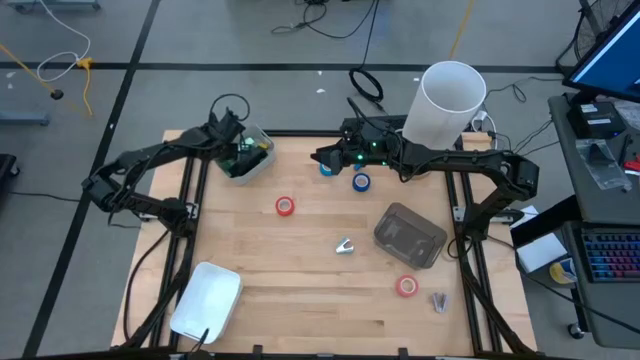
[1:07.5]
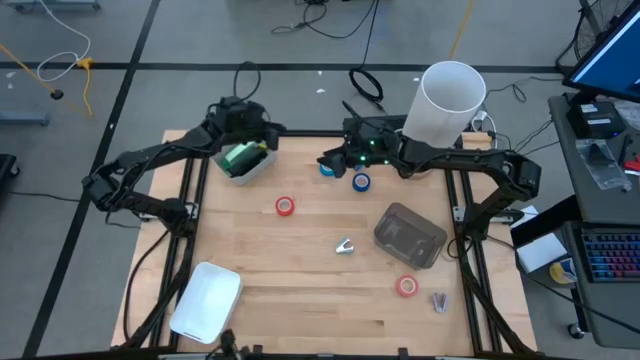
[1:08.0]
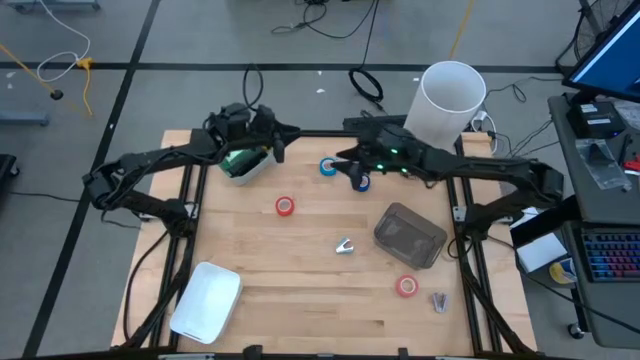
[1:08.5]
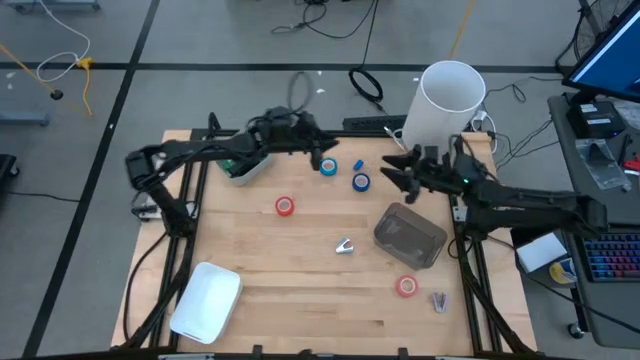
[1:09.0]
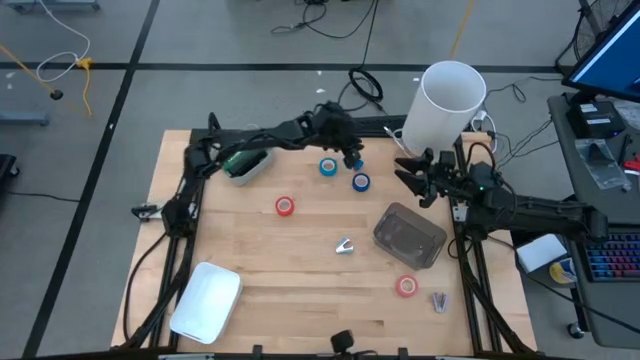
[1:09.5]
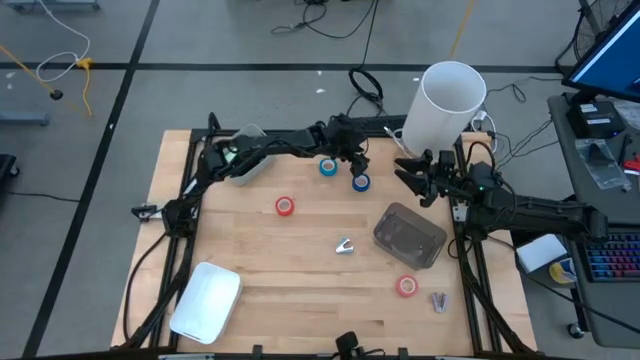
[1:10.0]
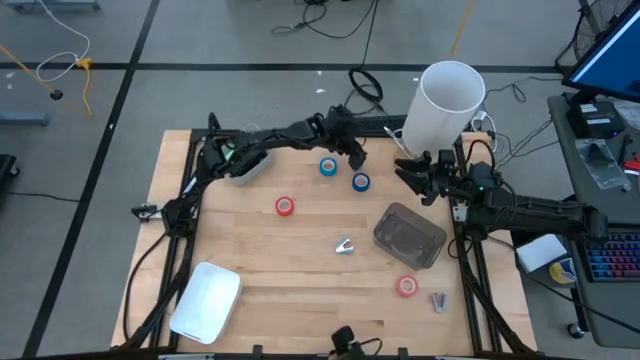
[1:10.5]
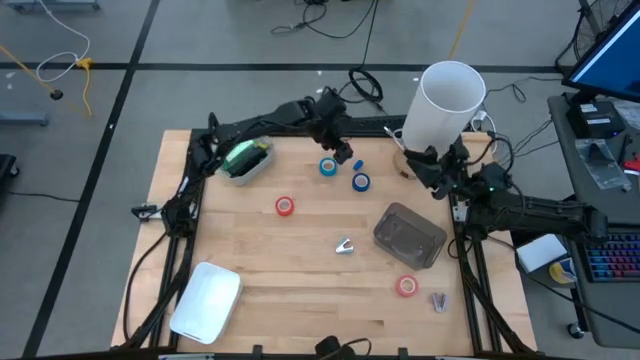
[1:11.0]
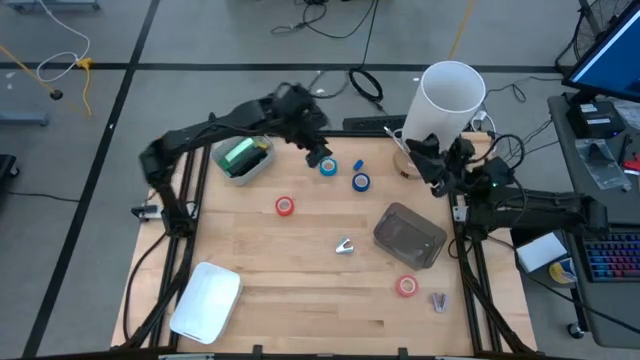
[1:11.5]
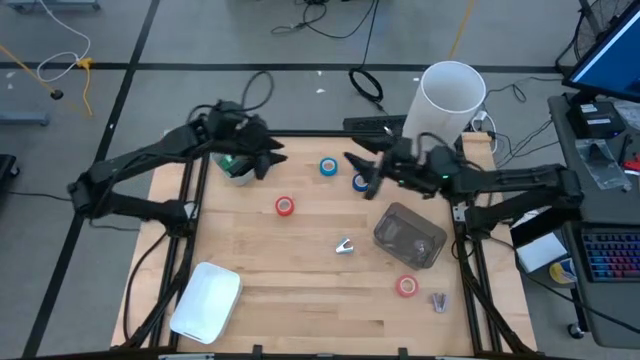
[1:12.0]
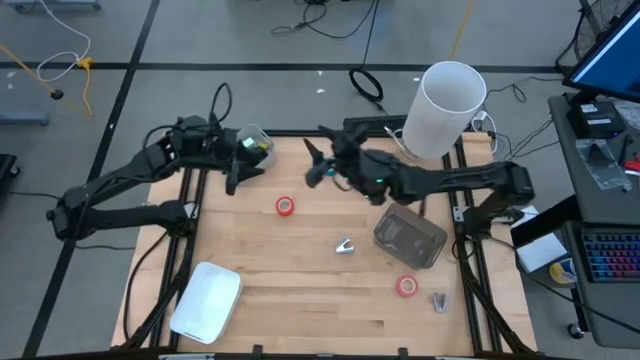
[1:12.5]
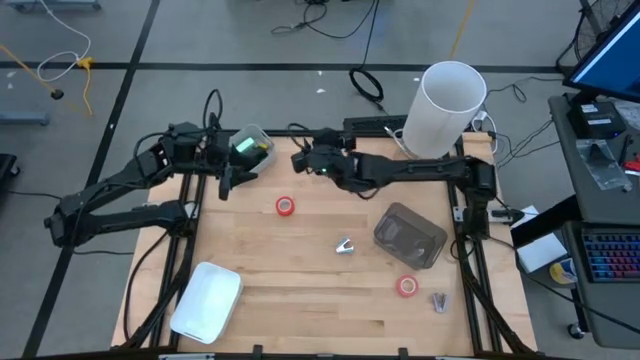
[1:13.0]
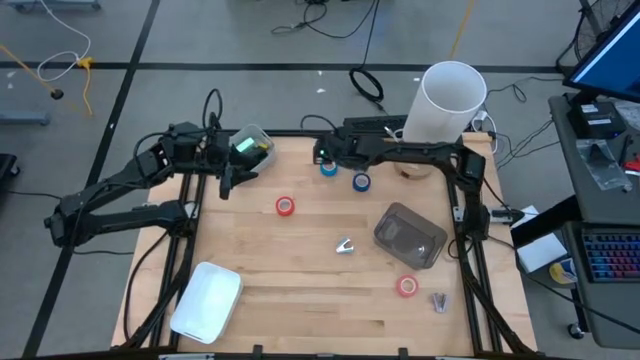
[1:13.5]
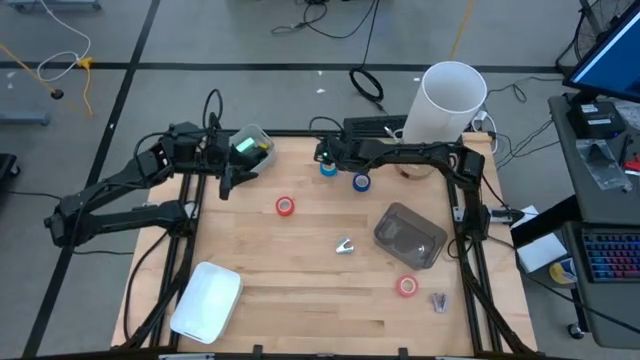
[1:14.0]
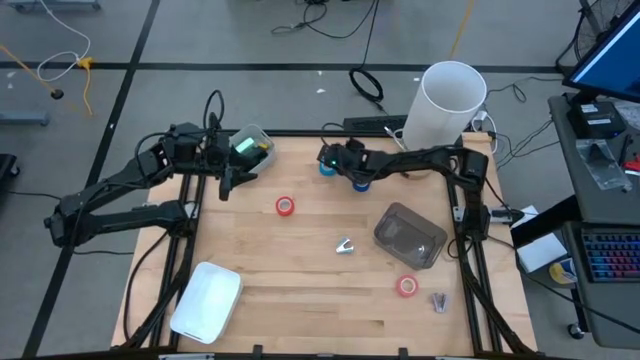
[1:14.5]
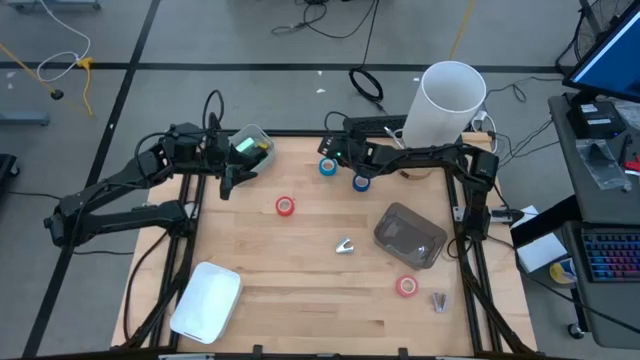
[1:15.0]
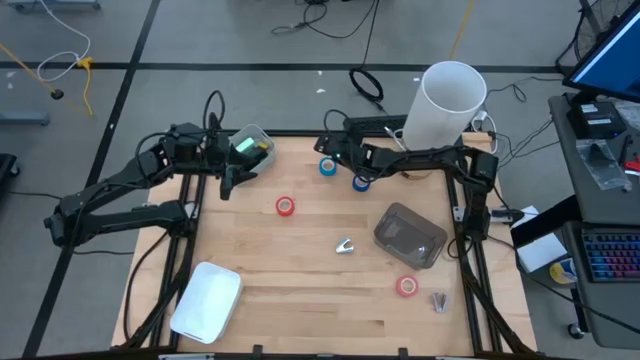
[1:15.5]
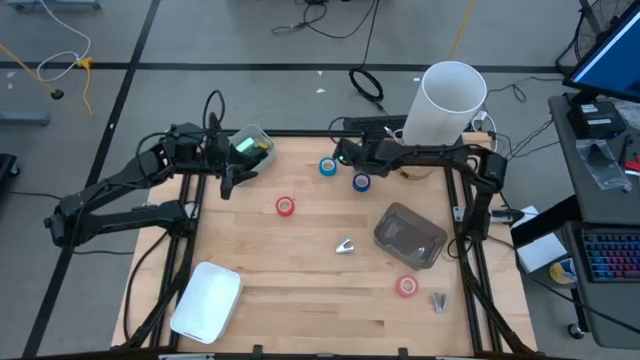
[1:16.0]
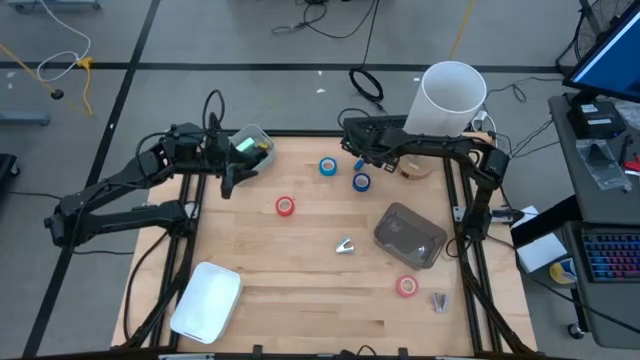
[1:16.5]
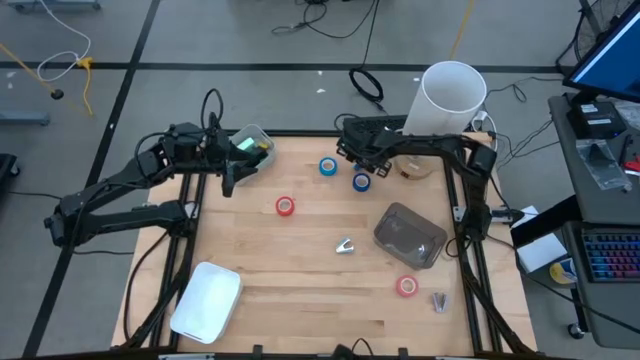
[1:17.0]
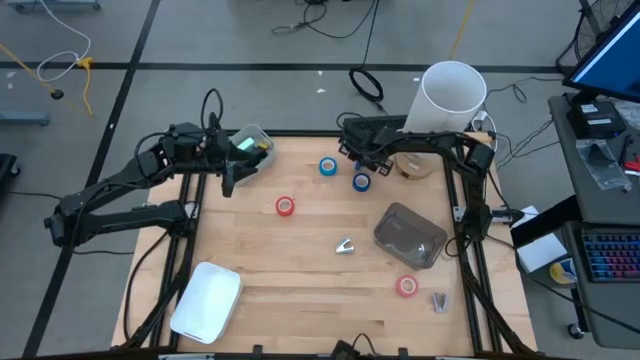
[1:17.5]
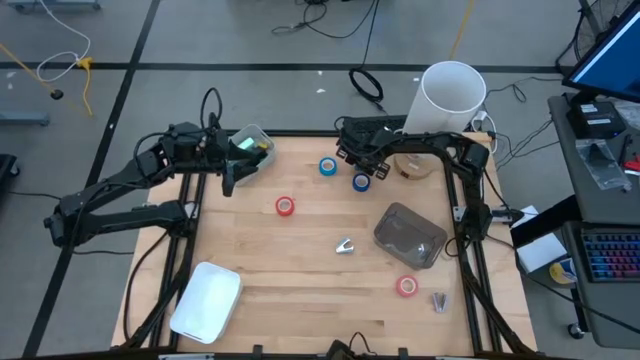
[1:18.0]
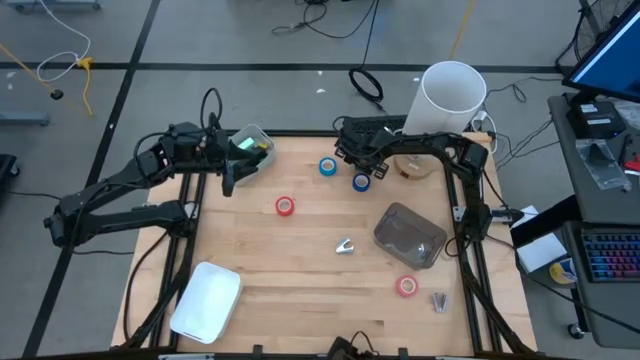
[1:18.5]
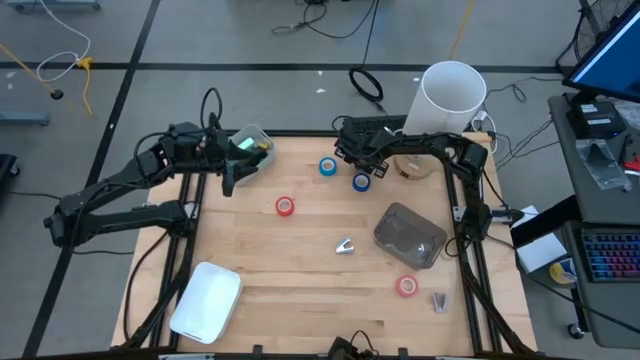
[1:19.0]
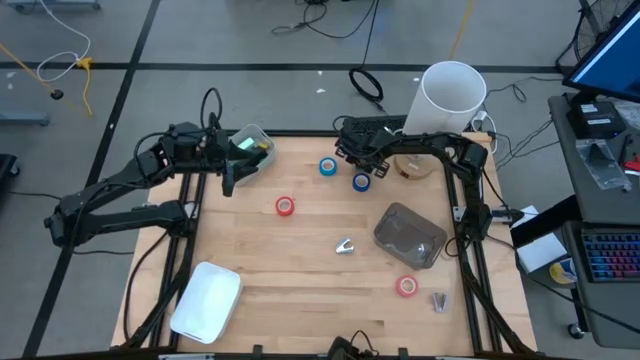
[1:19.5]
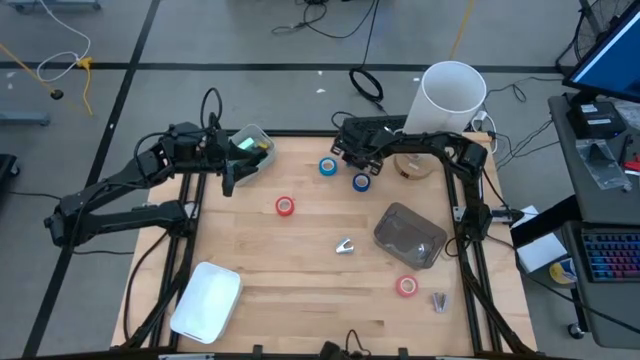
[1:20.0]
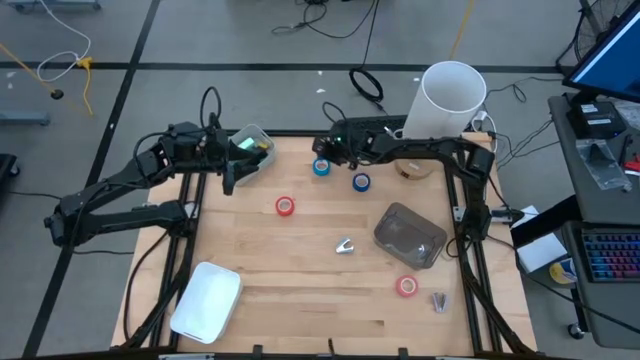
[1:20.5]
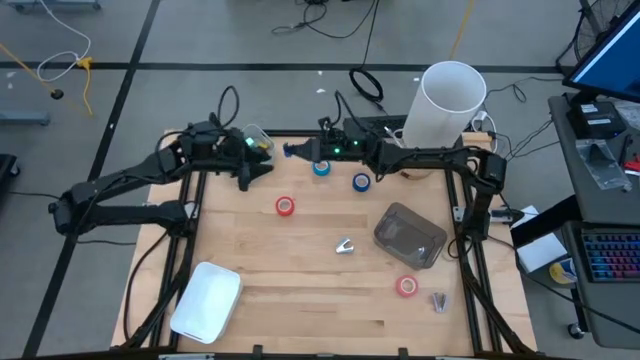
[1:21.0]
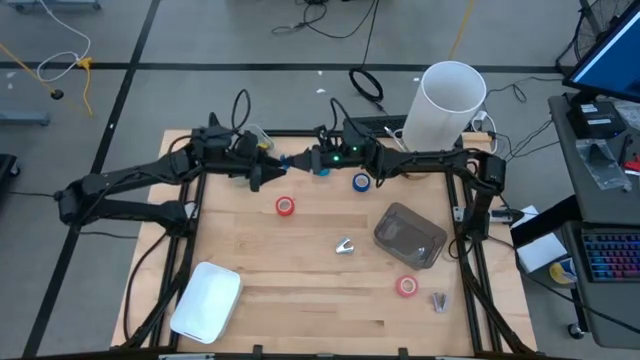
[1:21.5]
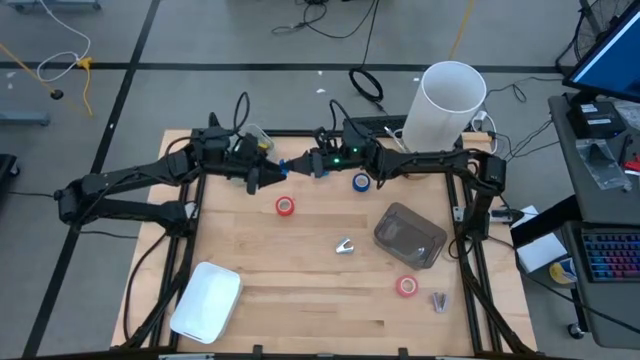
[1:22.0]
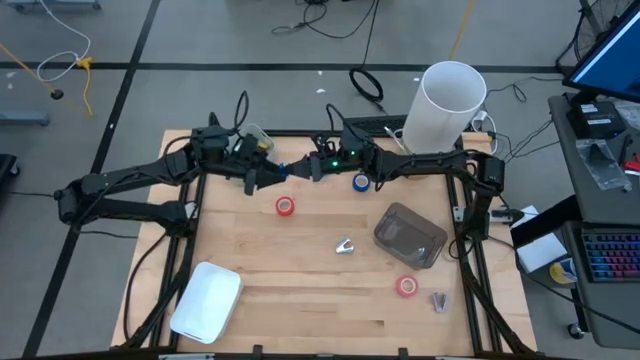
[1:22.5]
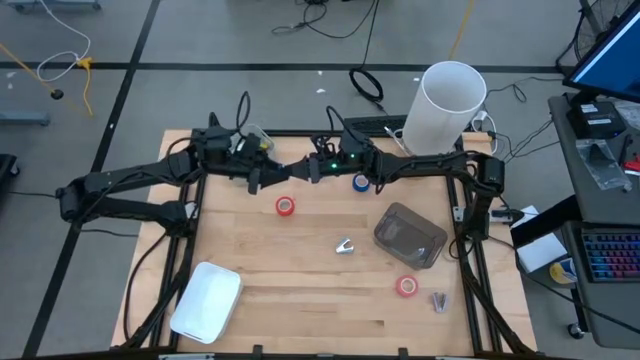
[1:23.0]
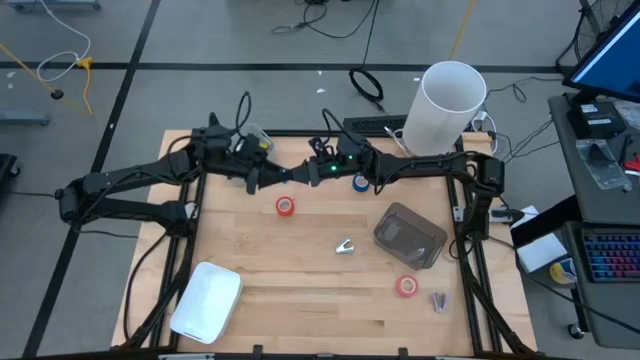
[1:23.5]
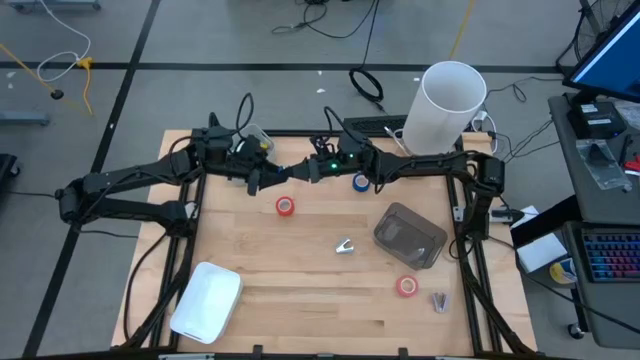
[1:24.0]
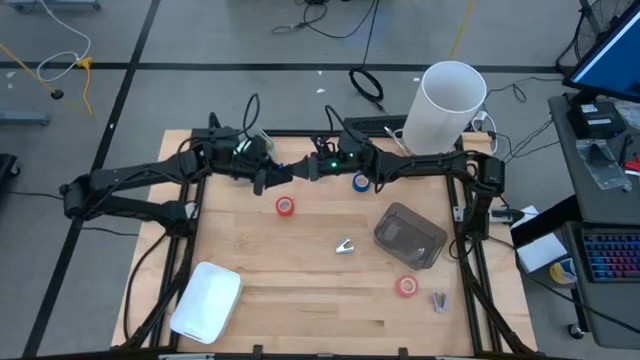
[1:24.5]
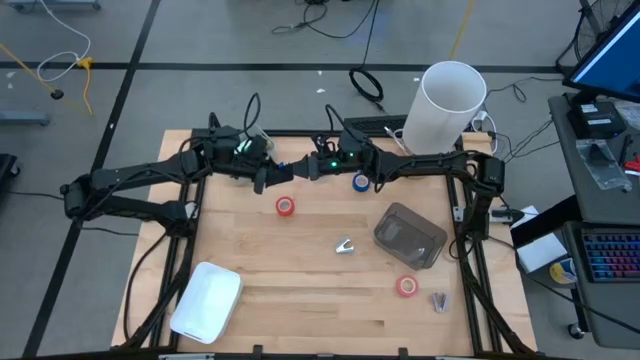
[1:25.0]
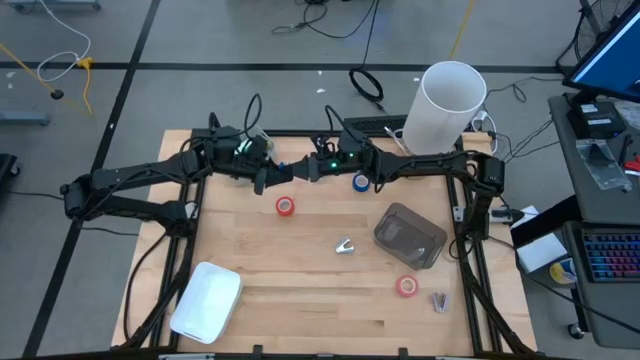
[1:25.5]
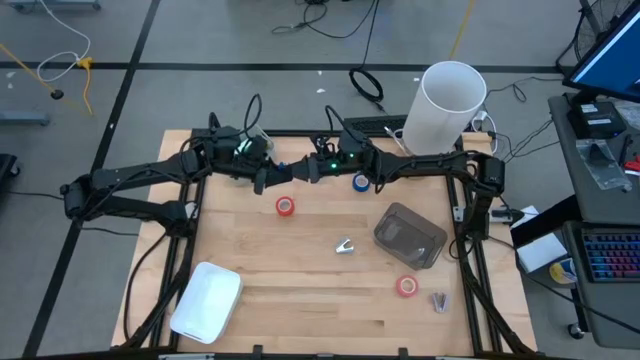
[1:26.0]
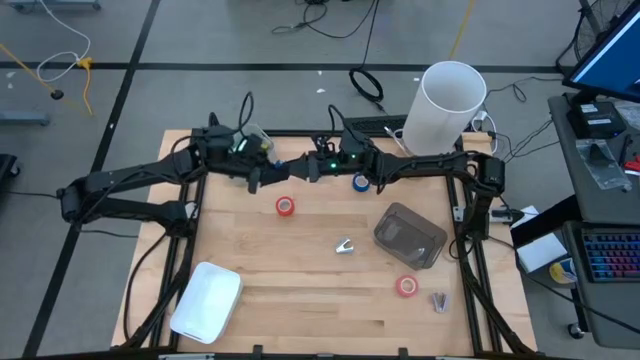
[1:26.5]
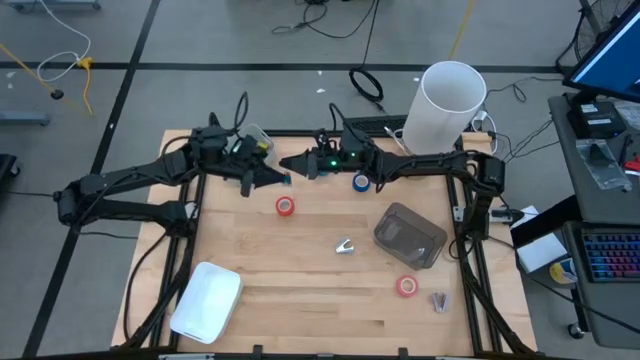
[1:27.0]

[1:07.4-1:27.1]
Task: Pick and place Stapler, Stapler remover, tape
Put the small blue stapler into the gray bin
